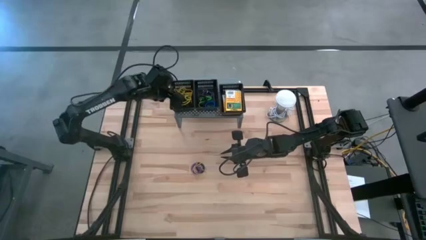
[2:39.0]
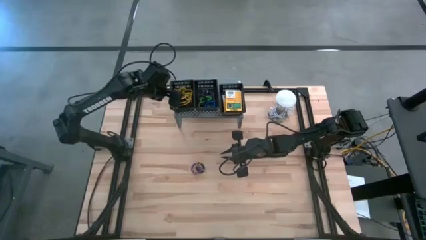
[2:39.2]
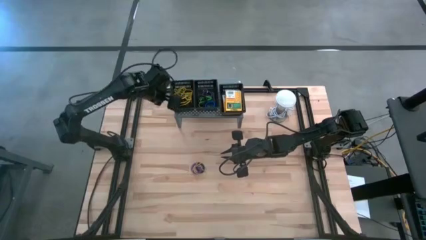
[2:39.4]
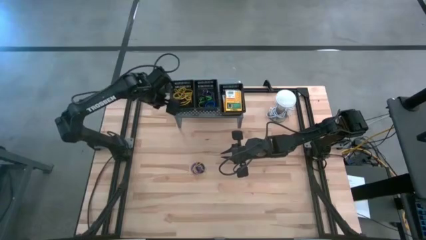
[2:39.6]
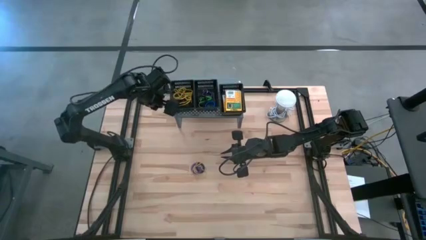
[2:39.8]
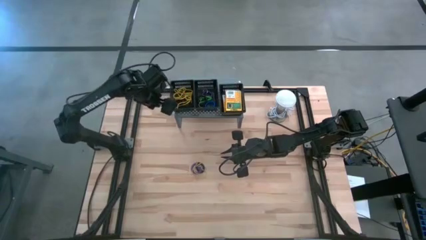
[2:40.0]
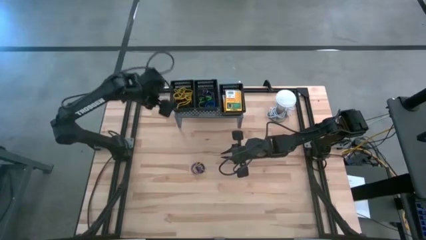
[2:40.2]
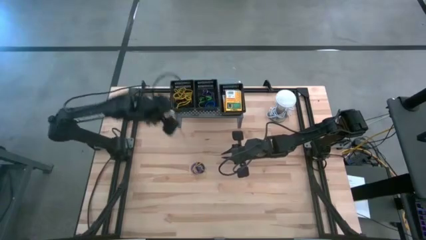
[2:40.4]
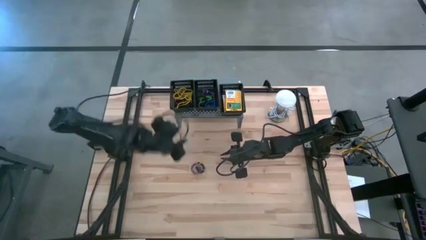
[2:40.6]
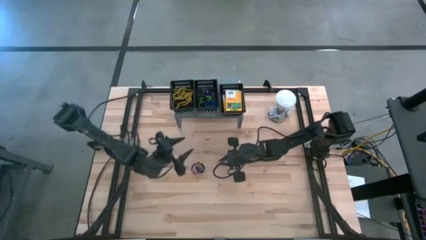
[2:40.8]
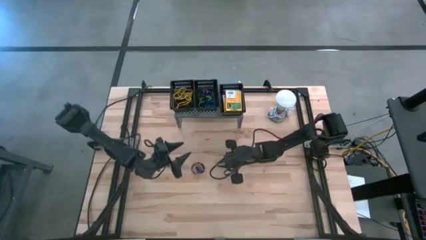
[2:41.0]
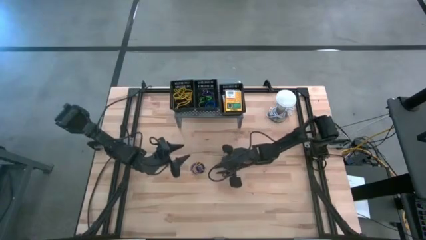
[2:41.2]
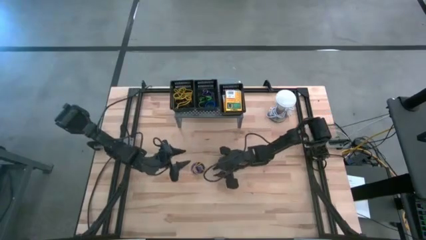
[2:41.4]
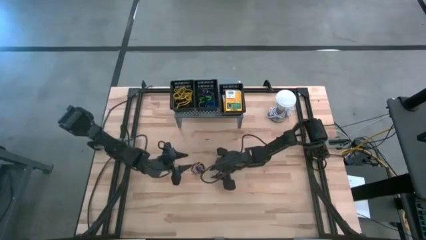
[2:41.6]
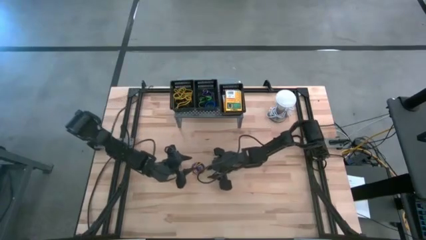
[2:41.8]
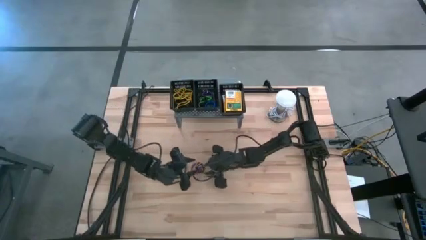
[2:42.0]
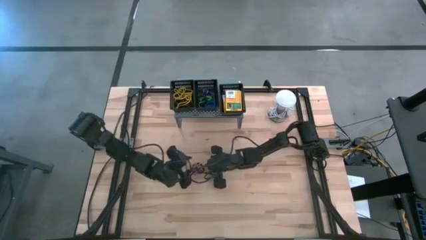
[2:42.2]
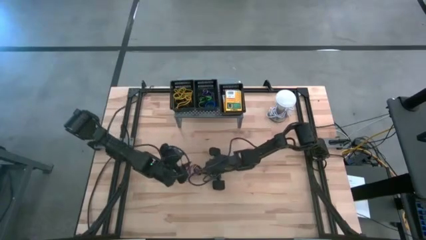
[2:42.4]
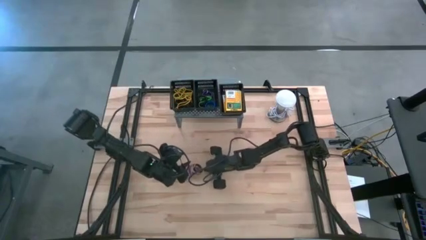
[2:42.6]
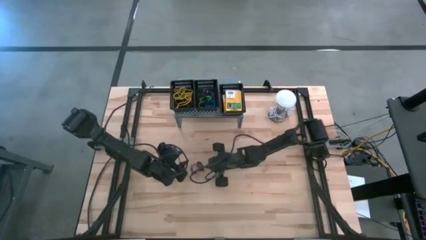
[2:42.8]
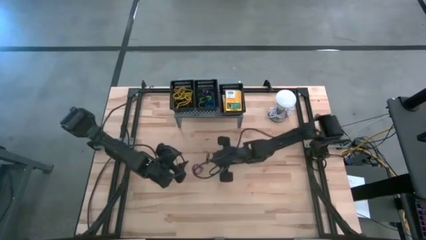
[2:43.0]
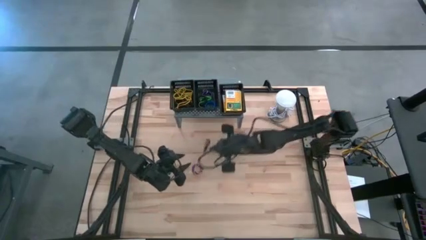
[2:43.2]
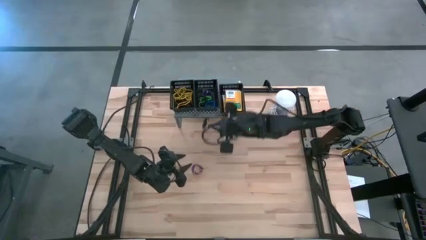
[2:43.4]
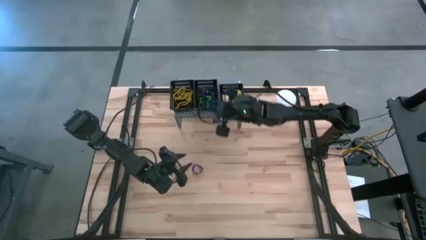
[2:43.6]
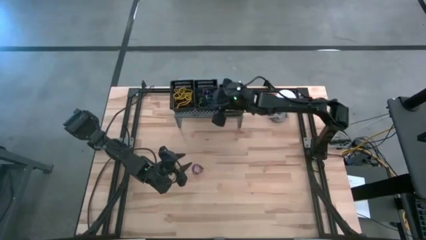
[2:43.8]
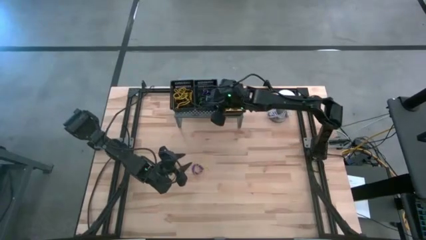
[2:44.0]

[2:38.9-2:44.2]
Task: Pick & Place Office Desk Supplies
Put the black spring keychain into the middle black bin on the shelf

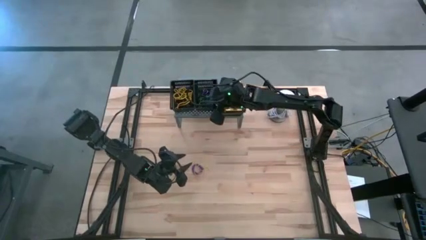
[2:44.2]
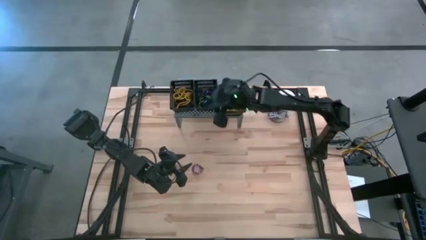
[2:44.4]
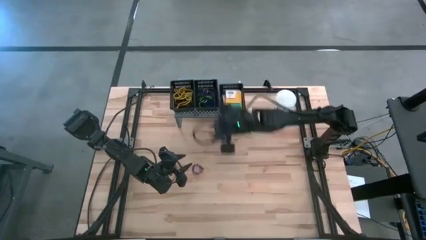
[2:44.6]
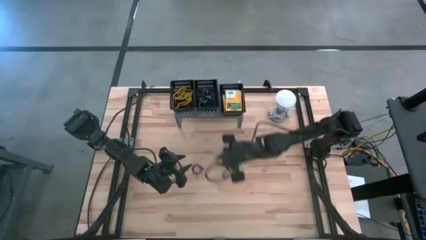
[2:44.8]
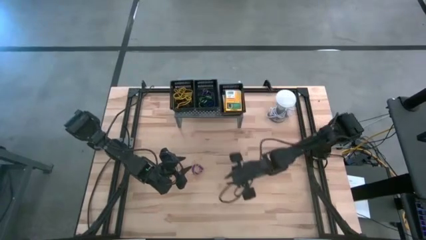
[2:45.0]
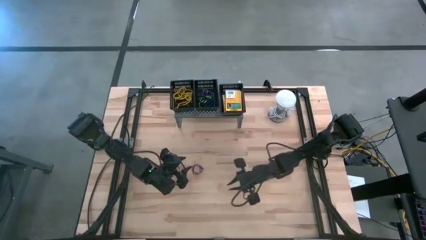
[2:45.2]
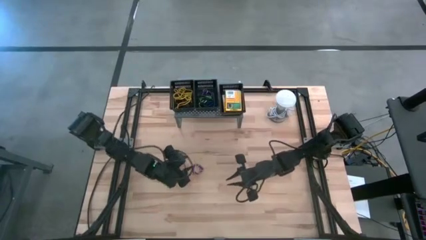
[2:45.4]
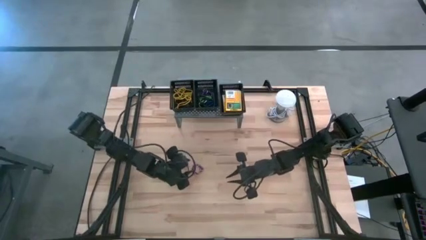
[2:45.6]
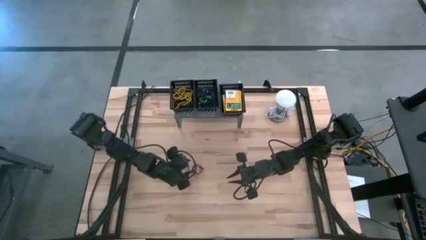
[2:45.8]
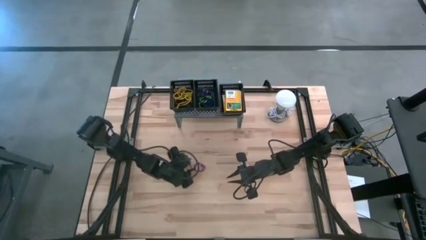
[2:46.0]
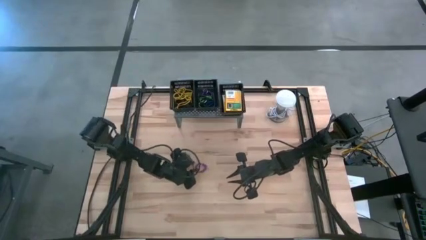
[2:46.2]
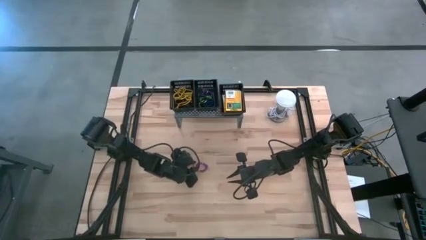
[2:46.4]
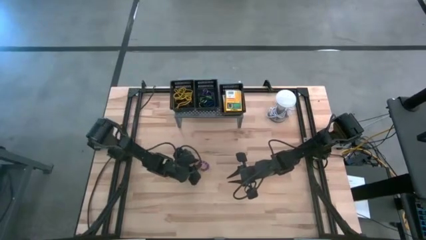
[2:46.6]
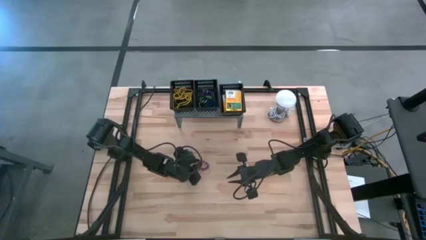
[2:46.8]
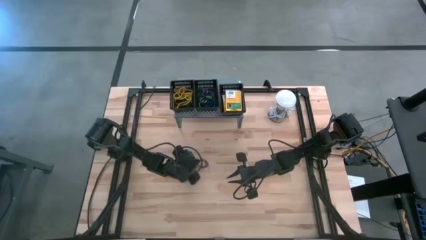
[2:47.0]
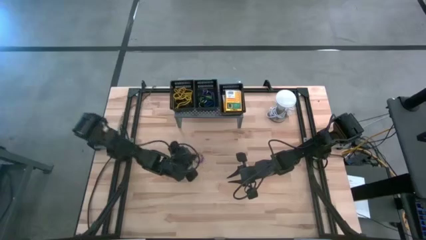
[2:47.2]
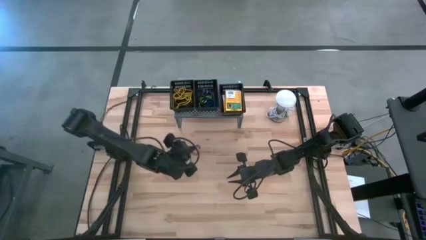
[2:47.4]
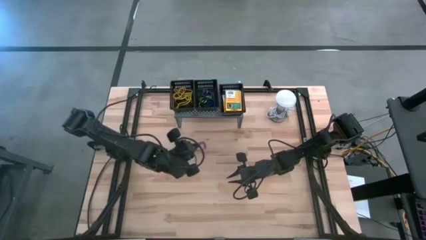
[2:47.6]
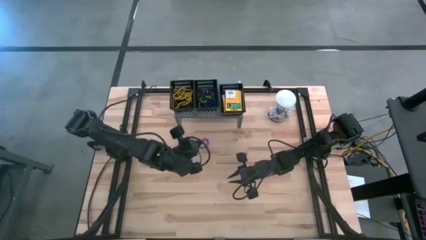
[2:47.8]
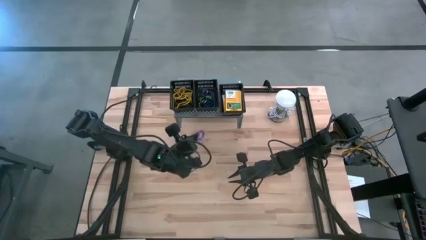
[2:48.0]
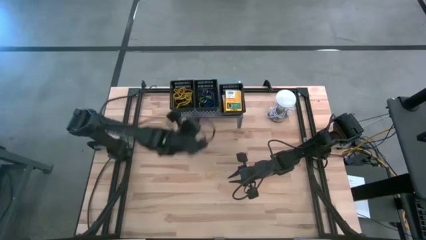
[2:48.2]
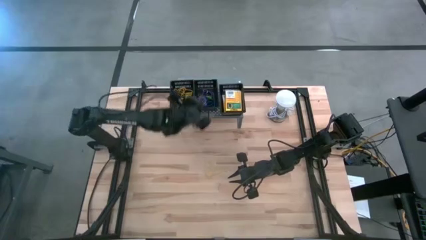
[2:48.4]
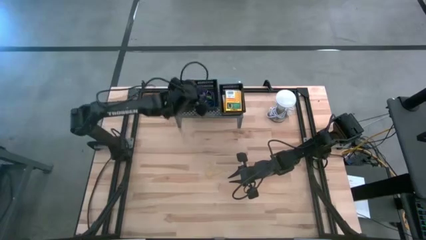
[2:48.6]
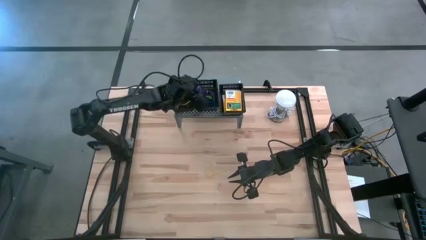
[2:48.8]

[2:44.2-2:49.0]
Put the violet spring keychain into the middle black bin on the shelf

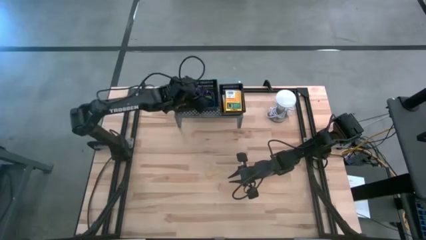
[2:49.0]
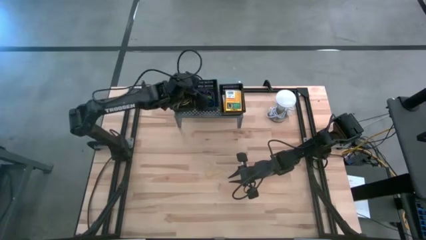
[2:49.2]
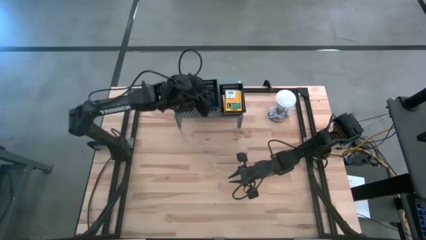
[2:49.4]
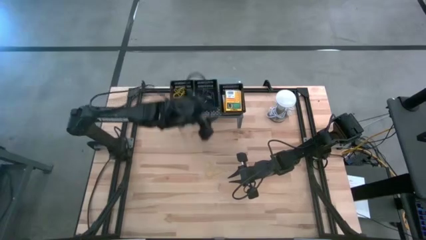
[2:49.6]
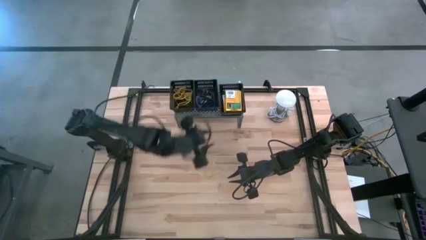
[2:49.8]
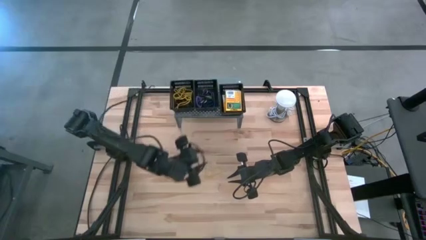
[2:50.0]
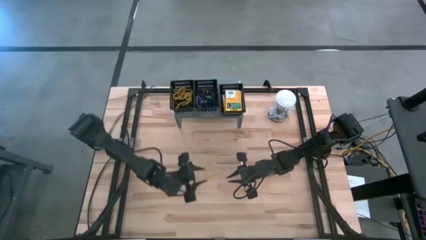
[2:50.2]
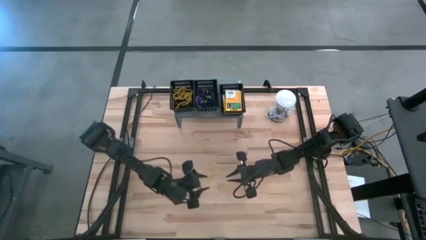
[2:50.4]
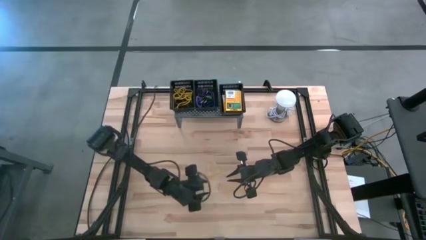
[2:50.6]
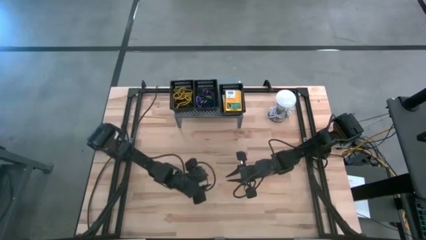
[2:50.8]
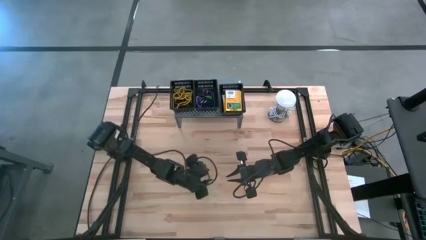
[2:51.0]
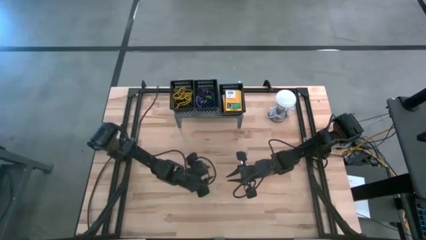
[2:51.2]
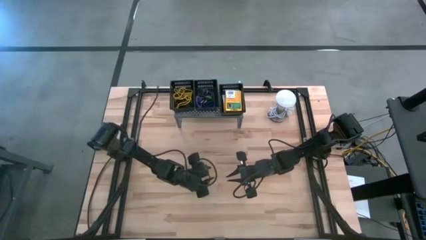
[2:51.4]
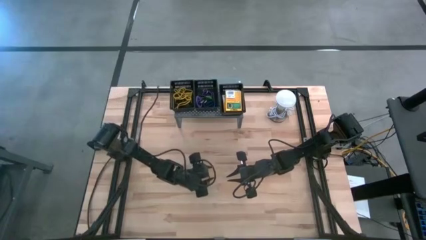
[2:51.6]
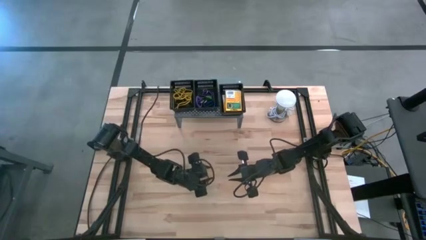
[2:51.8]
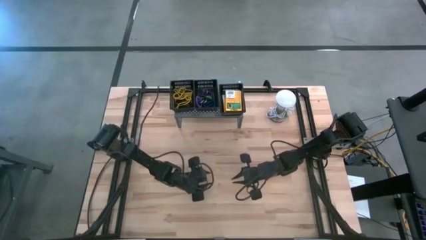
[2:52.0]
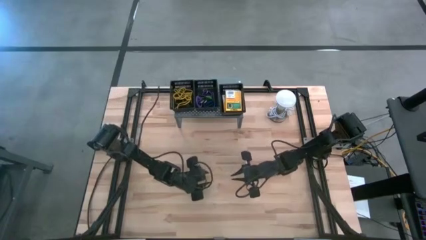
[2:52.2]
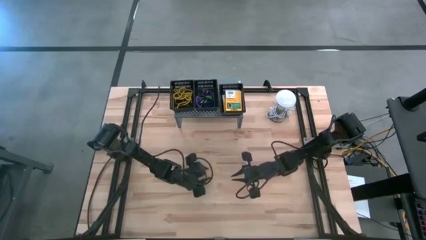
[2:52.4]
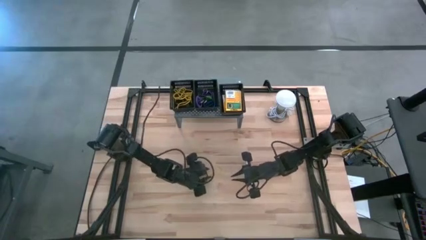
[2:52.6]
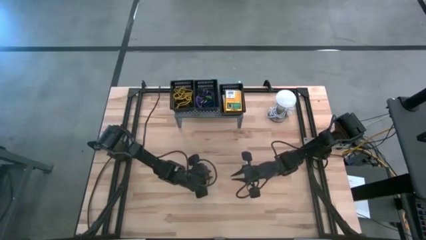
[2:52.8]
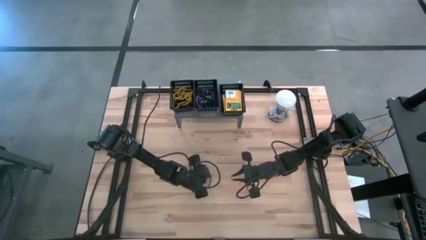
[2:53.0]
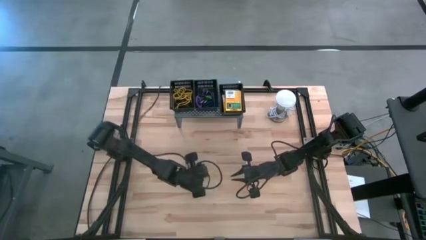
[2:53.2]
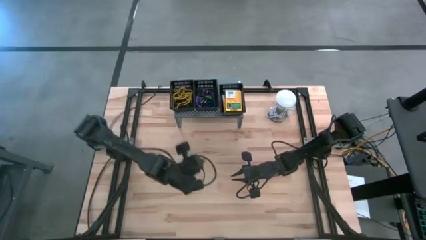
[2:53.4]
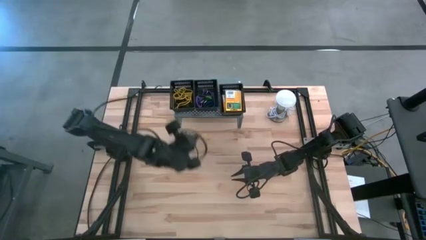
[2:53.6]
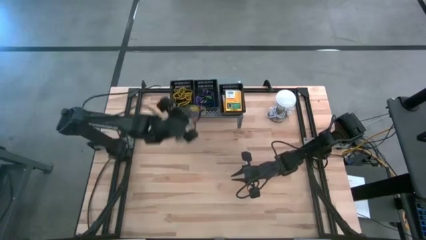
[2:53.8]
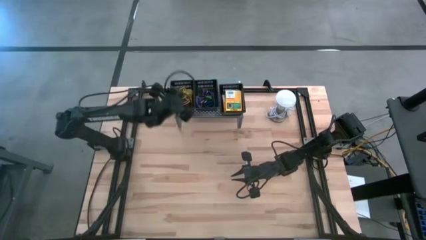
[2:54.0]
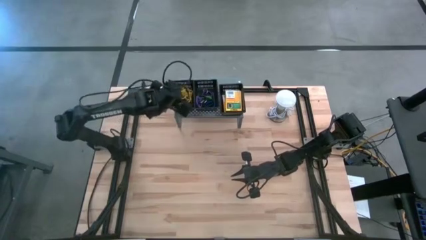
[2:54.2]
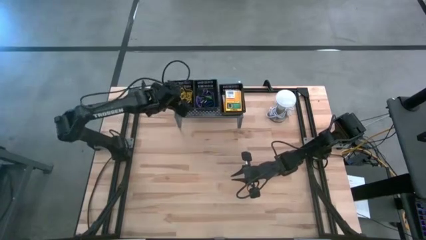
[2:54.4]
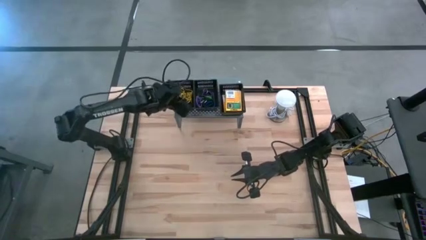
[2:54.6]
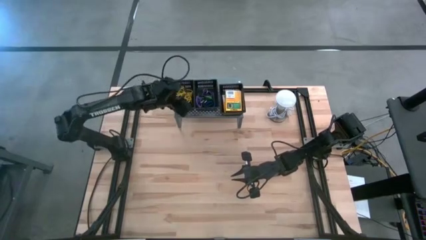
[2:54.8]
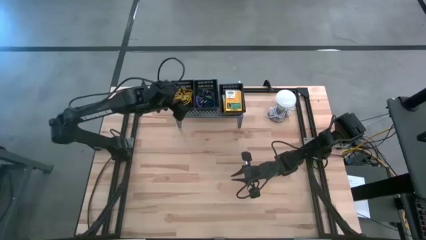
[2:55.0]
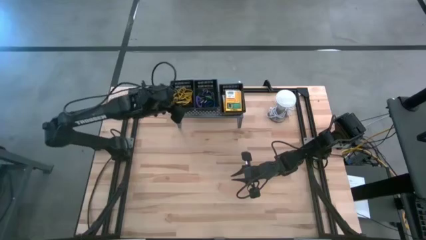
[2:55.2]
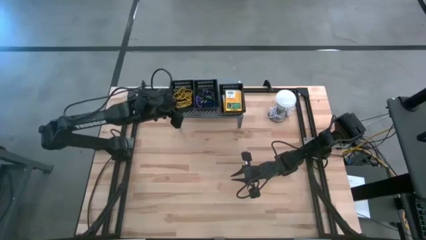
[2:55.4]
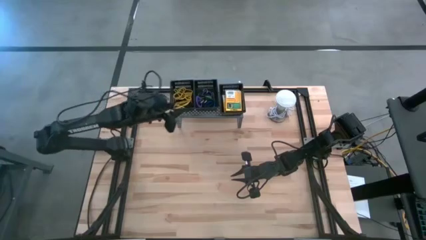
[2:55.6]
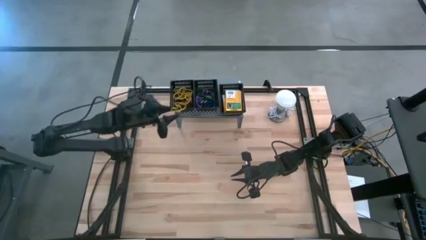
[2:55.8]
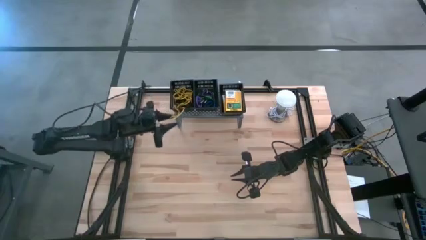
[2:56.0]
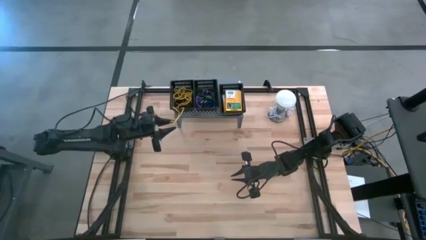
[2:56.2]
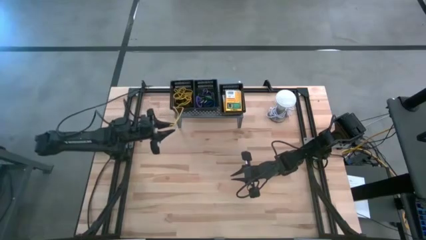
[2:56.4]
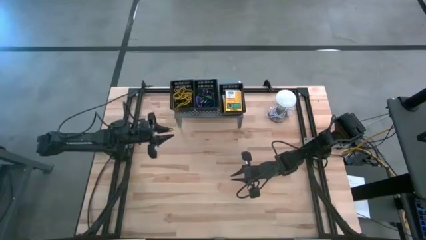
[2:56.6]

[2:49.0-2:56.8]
Put the yellow rubberband into the left black bin on the shelf
